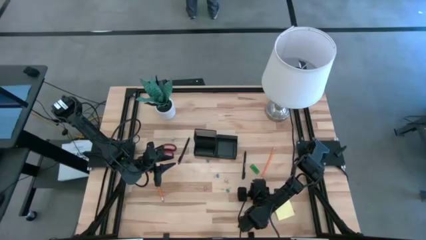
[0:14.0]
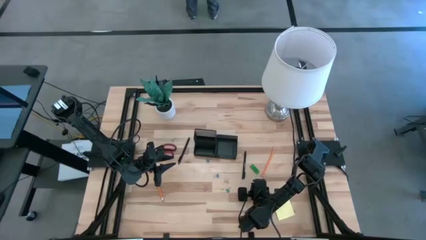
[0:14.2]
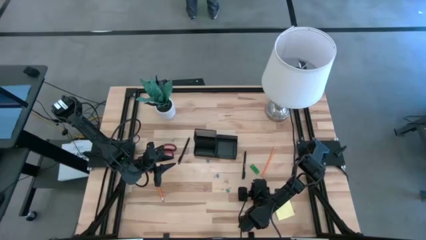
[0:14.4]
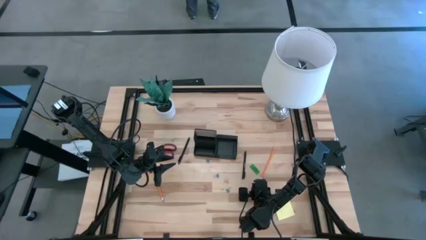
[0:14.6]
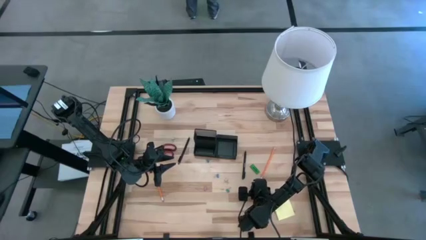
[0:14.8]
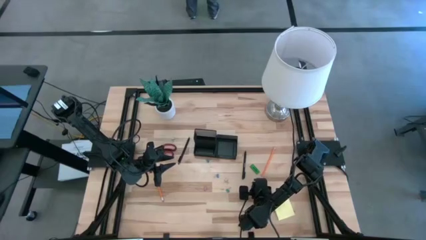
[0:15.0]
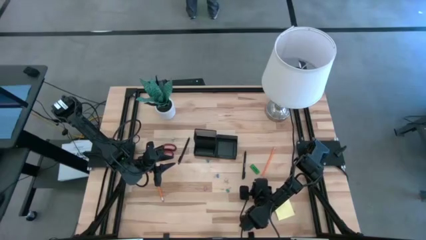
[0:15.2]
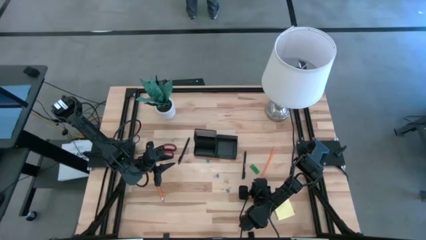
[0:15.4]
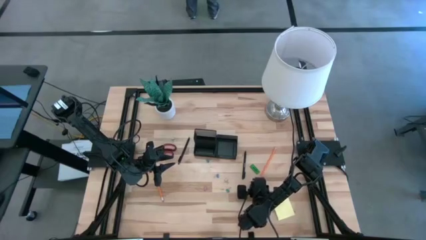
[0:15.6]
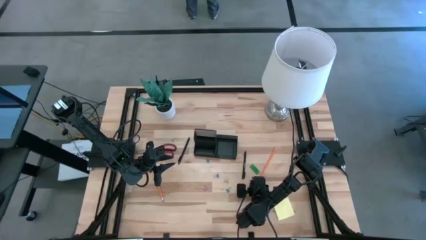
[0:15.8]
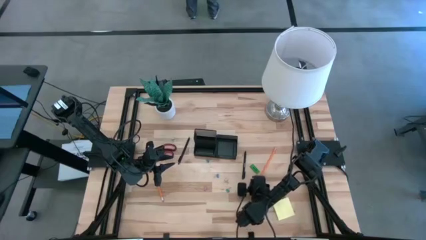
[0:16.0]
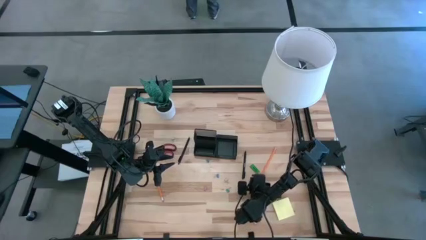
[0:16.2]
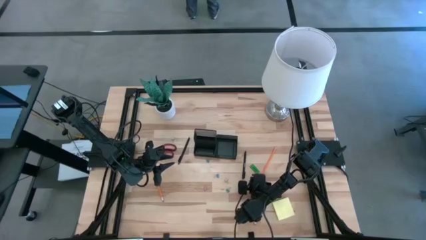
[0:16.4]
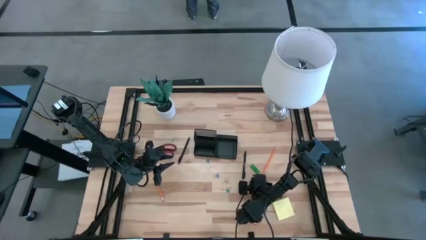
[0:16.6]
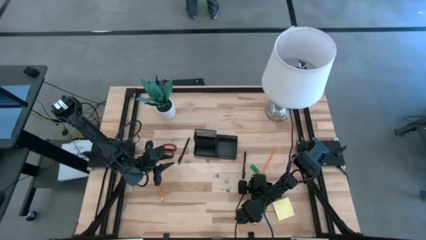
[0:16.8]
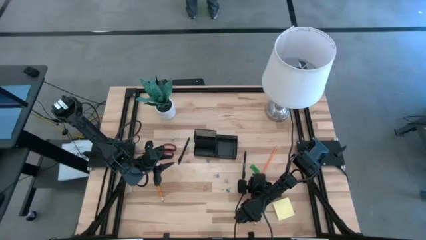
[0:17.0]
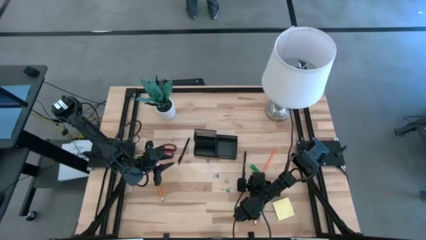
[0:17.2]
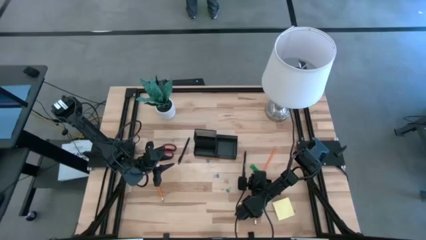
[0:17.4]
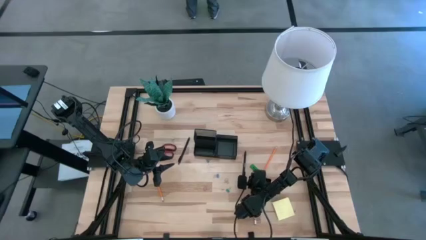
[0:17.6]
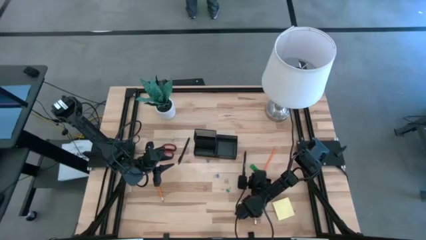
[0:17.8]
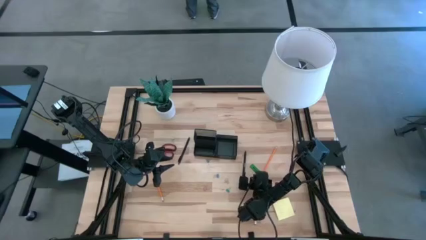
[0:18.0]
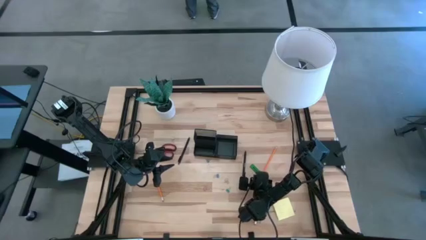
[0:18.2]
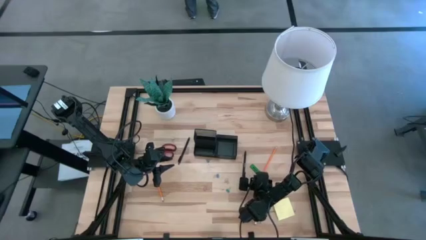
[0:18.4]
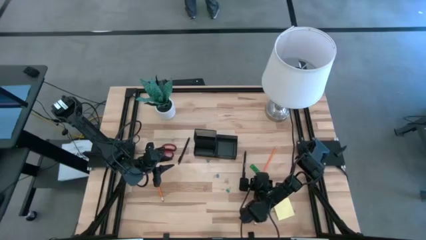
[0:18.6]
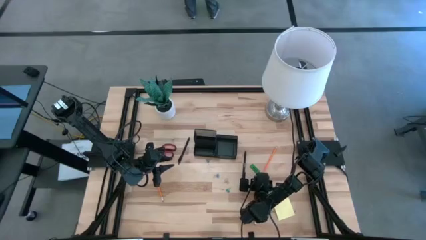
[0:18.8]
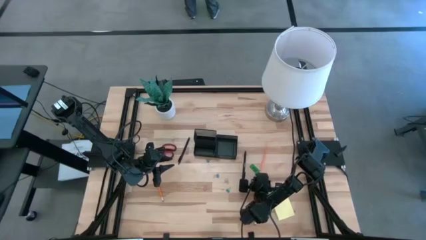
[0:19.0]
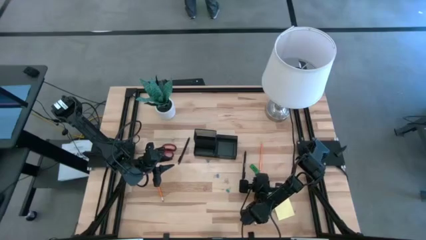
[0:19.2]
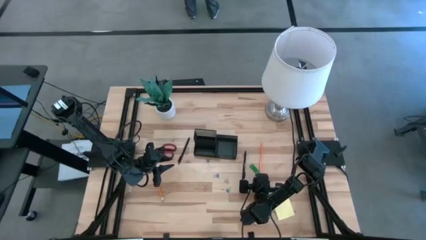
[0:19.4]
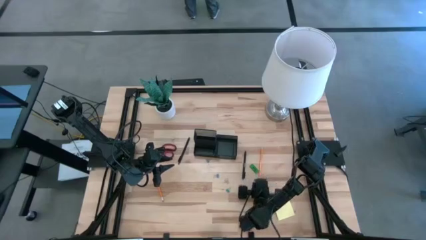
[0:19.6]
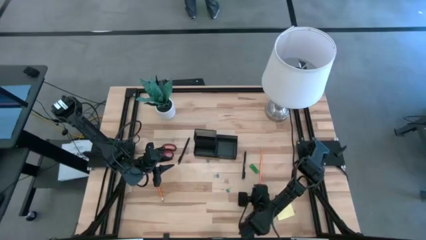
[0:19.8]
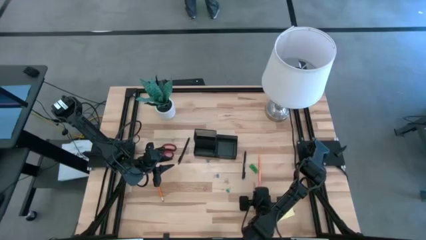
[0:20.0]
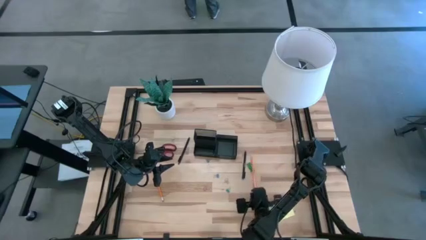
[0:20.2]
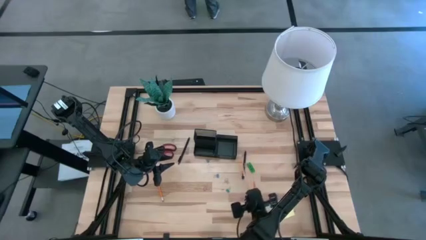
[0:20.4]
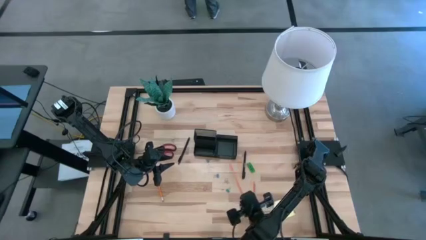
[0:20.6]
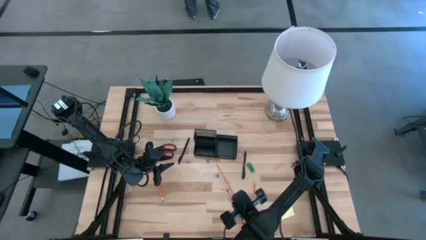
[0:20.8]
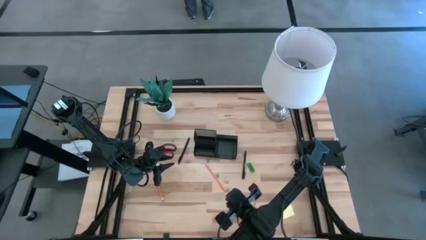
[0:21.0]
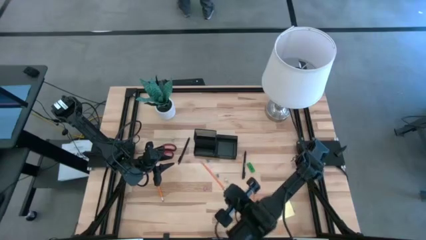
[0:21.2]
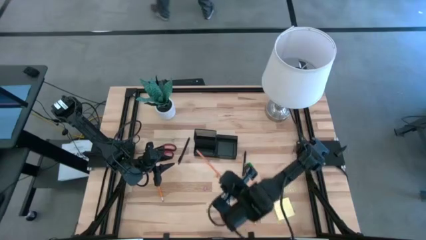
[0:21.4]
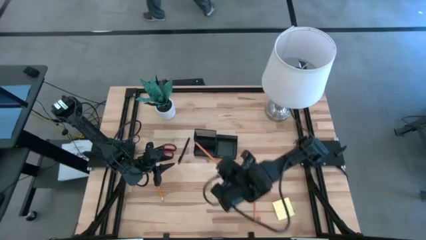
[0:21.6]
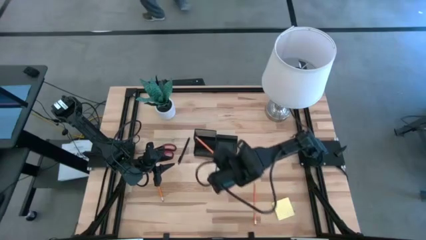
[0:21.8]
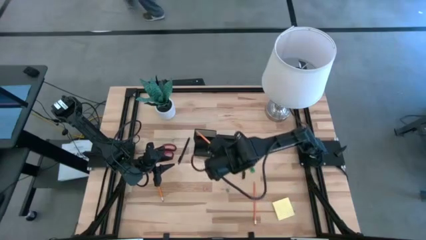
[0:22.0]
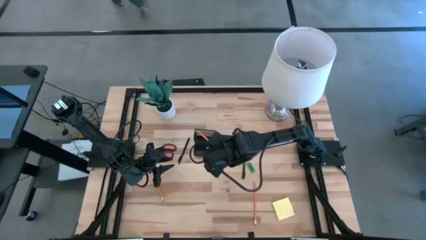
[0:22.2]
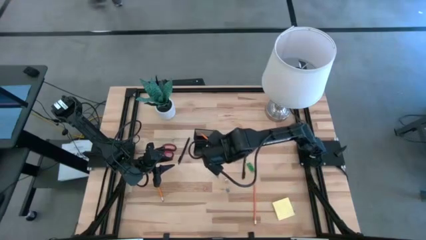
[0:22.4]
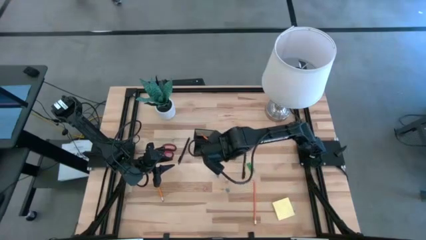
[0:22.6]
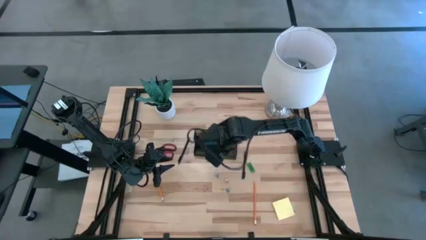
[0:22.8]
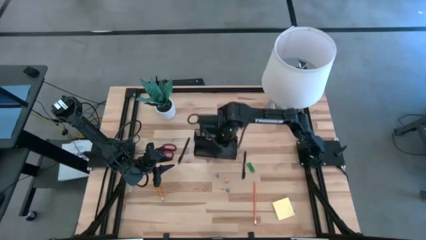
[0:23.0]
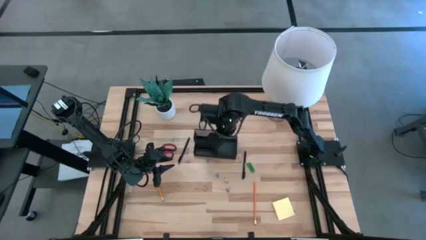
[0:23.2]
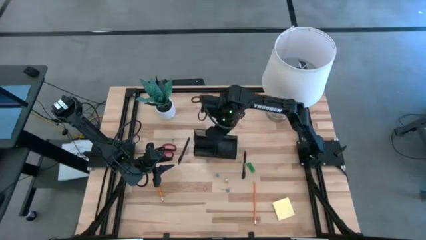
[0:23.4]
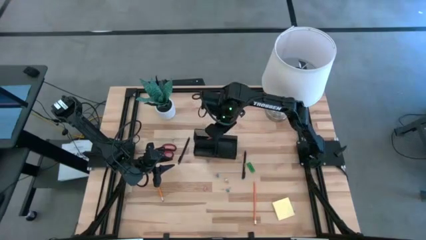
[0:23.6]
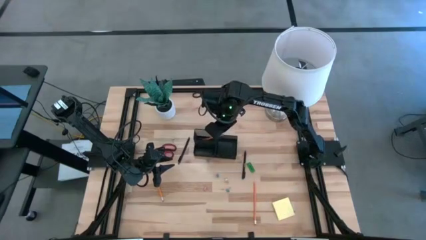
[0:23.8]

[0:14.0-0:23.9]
Task: Pick and place office supplies into organizer
Put the top right orange pencil into the black desk organizer
